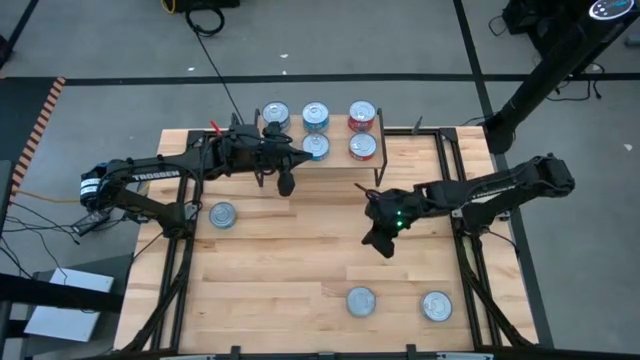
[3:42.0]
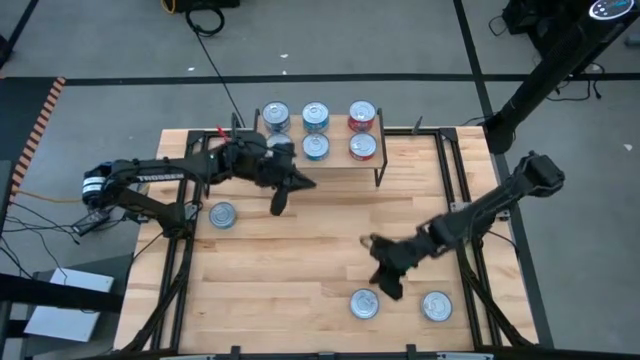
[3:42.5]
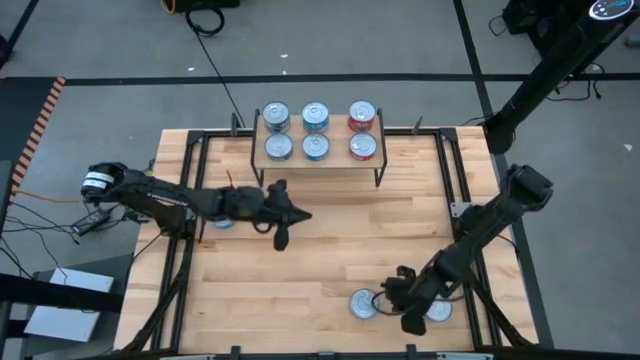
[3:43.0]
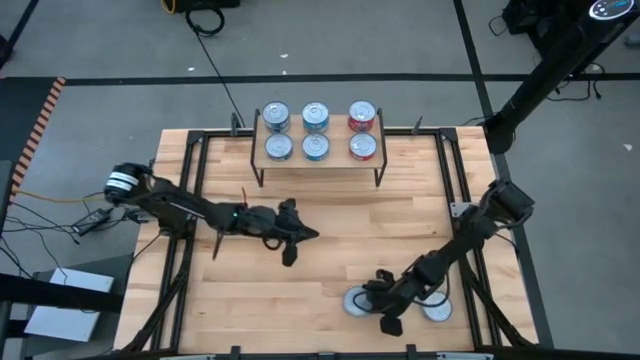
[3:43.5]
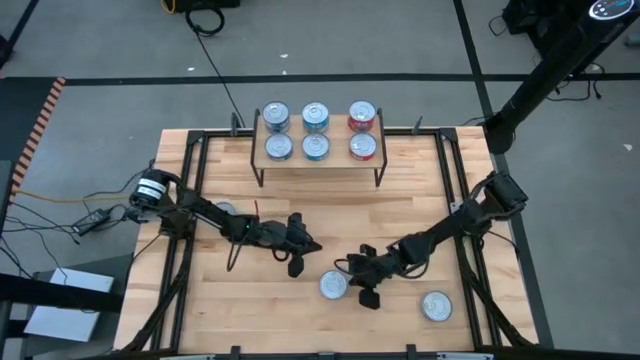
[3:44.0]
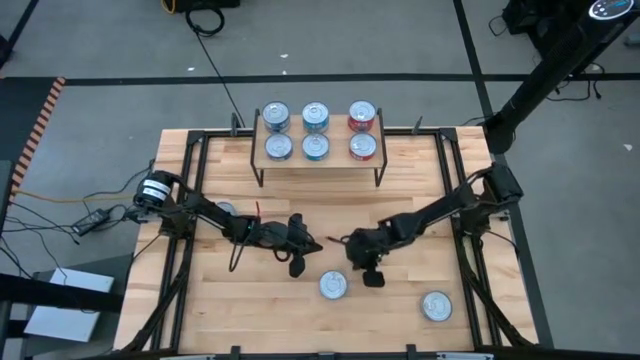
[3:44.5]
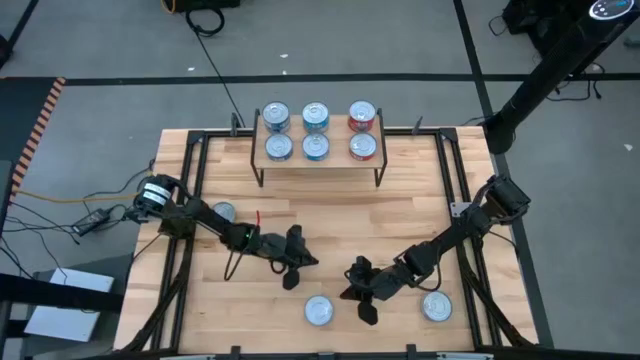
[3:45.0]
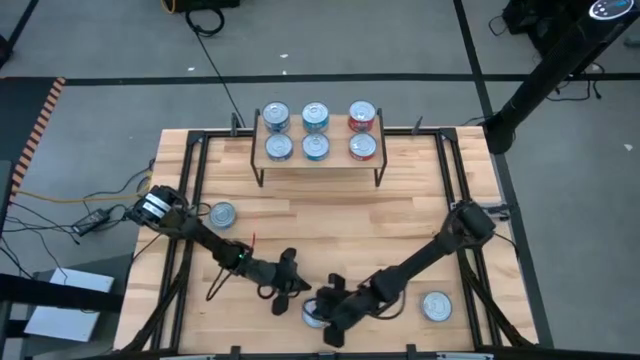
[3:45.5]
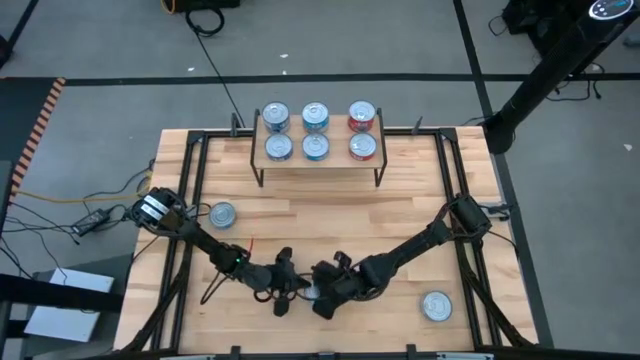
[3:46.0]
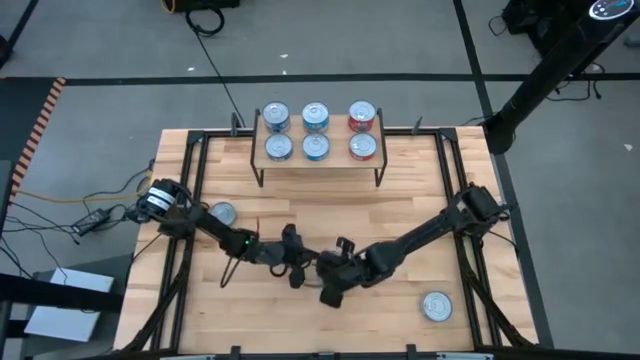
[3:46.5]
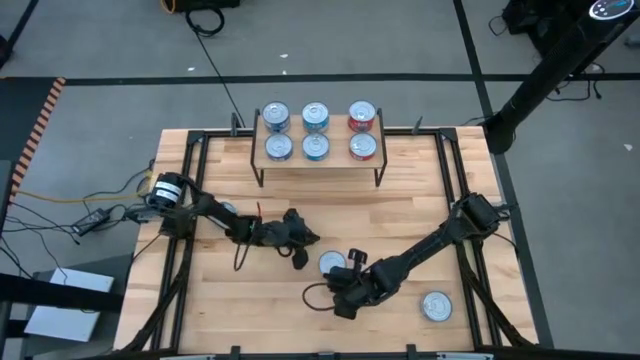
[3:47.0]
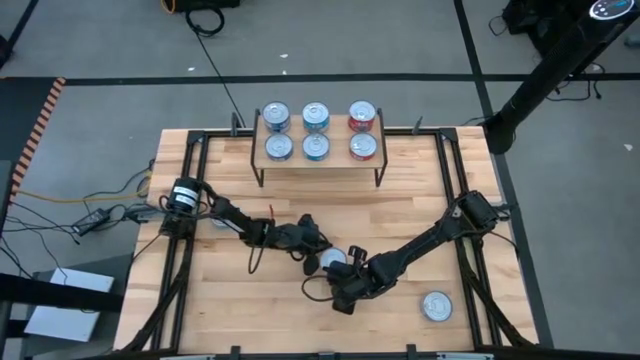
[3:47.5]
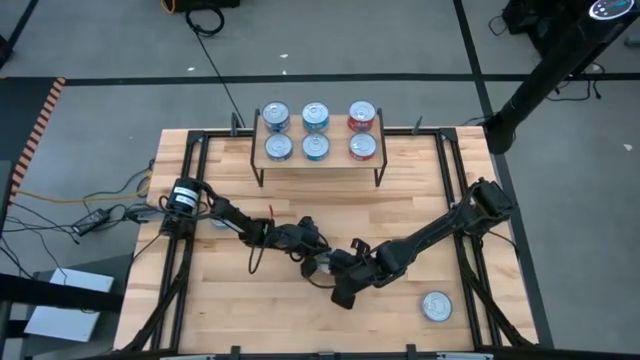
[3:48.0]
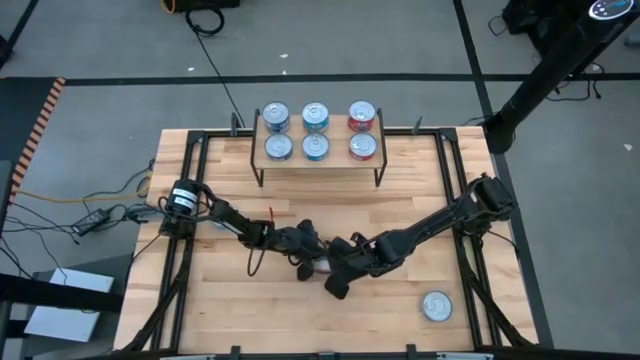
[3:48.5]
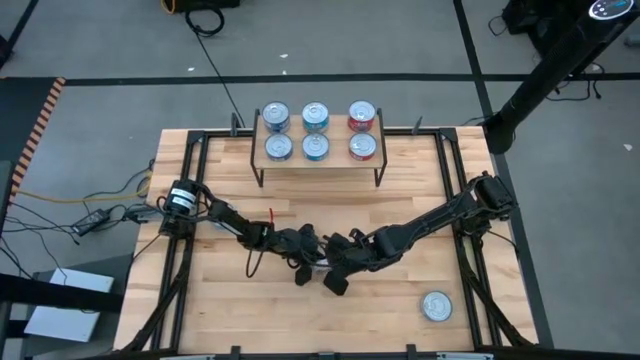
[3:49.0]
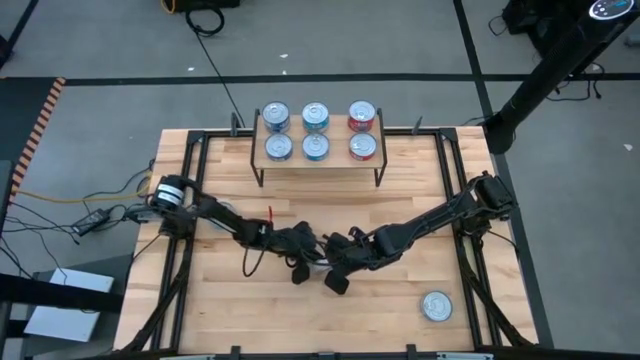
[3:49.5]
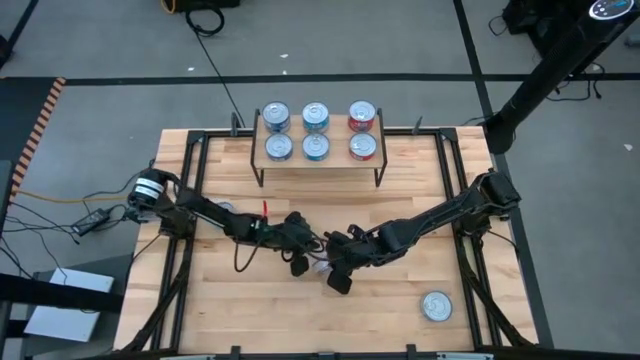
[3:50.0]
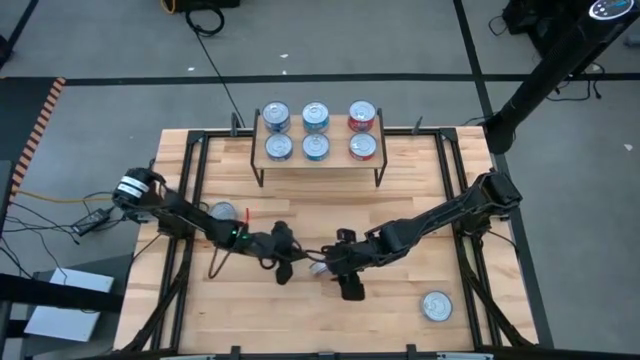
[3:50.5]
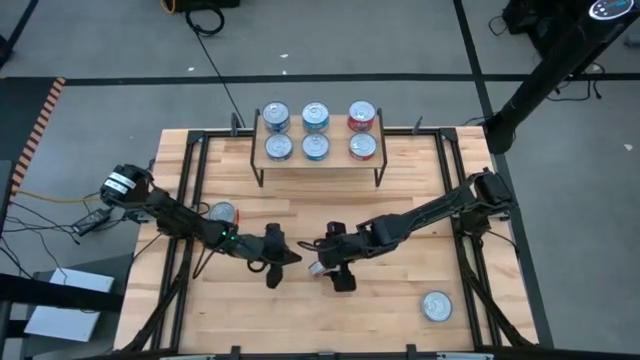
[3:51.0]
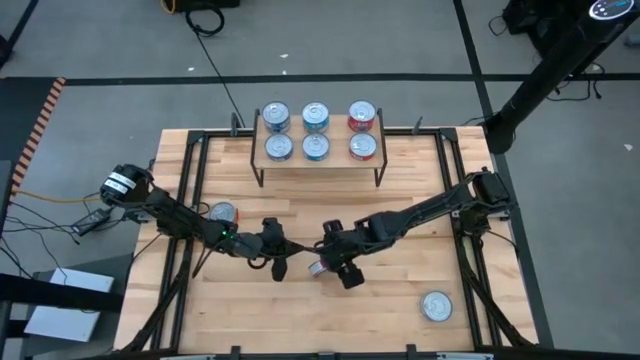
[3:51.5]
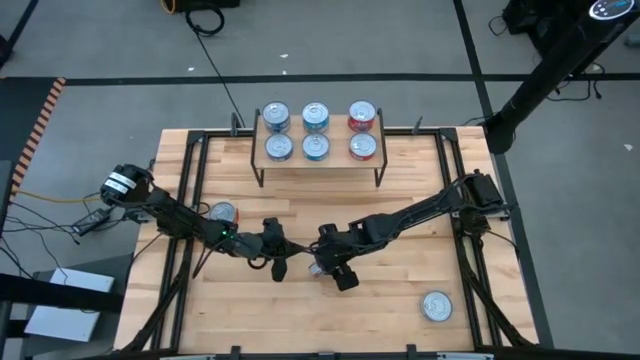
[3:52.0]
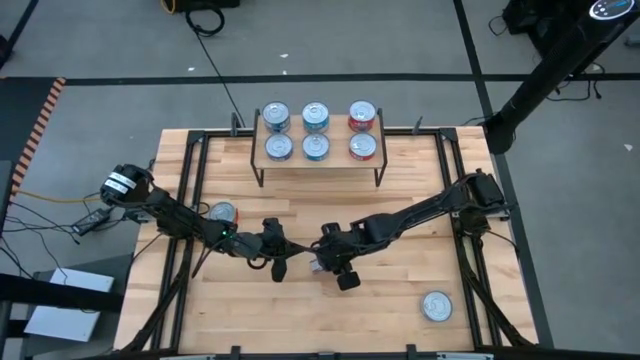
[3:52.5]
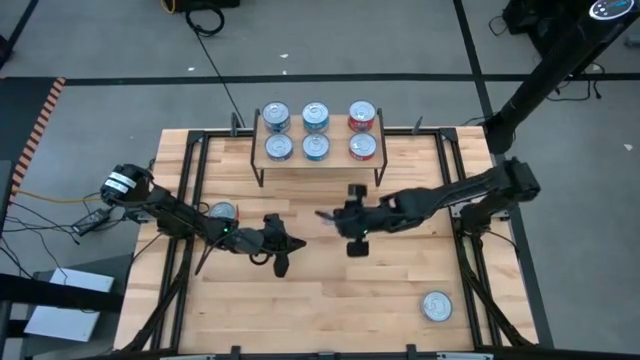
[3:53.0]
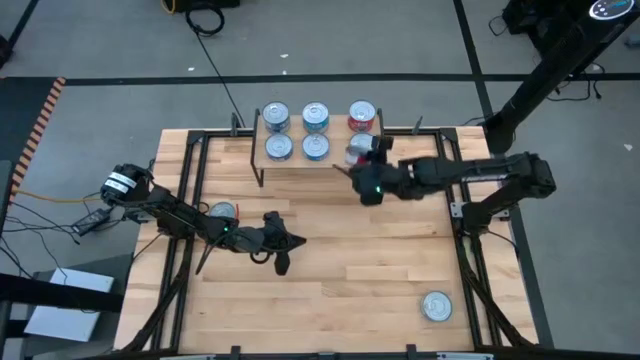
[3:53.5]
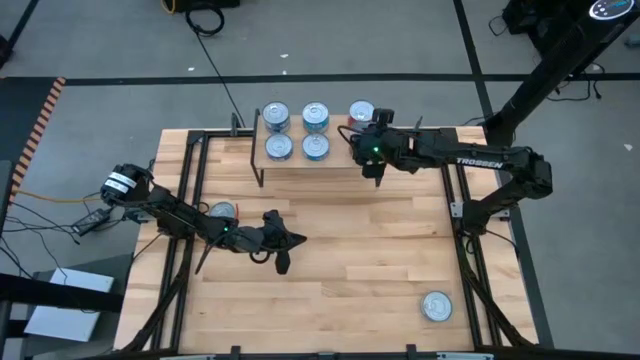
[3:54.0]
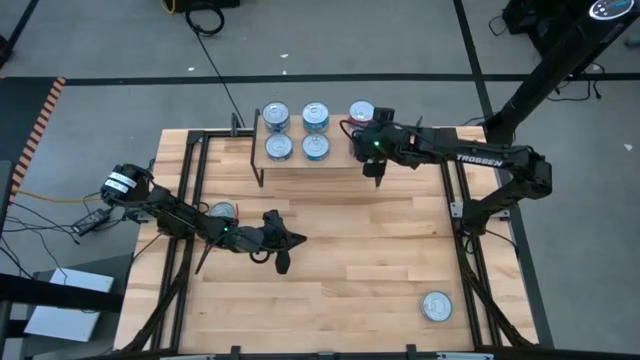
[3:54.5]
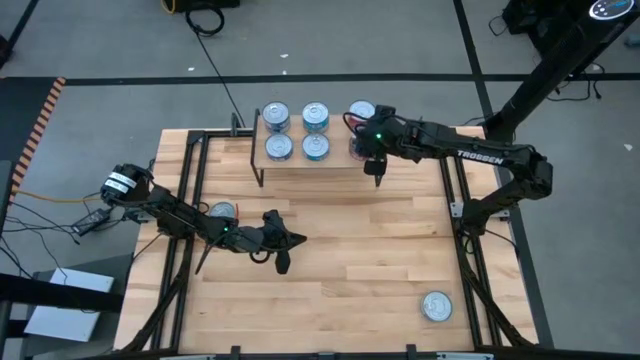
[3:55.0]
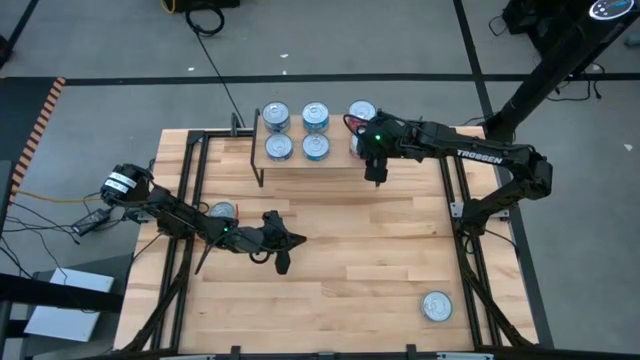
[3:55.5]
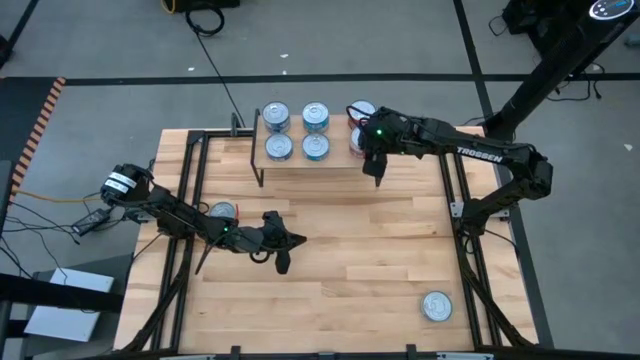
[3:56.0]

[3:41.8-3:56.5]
Task: Stack canned seafood by type on shelf
Stack the red tuna can on top of the other red tuna can on the shelf

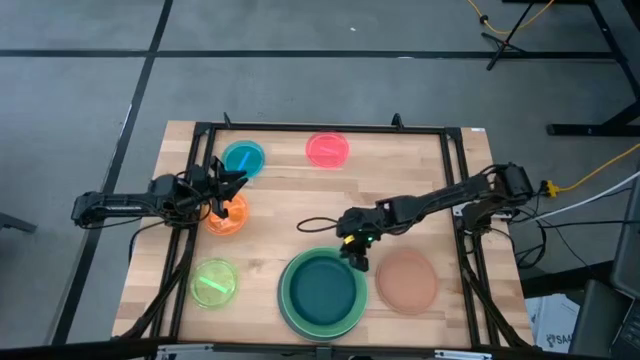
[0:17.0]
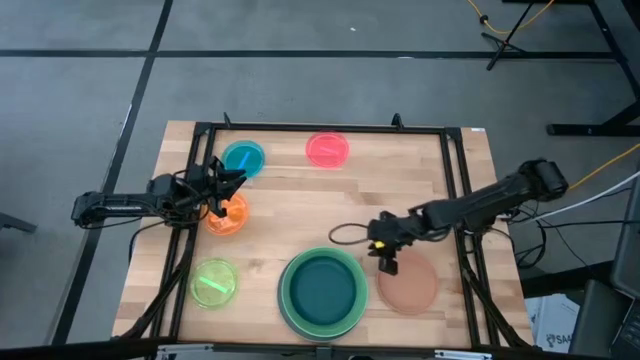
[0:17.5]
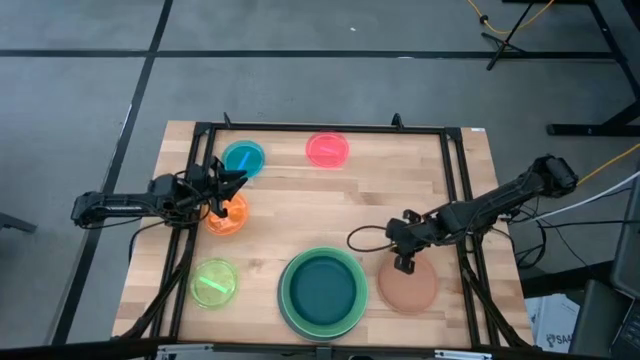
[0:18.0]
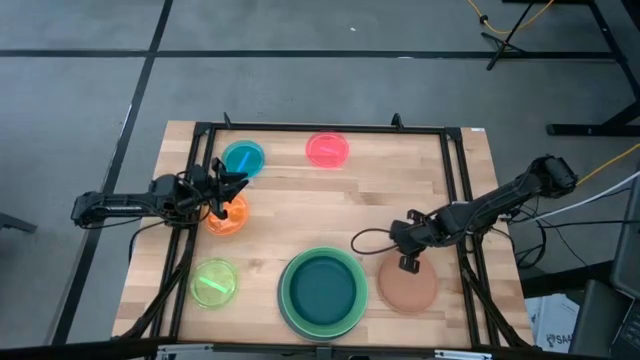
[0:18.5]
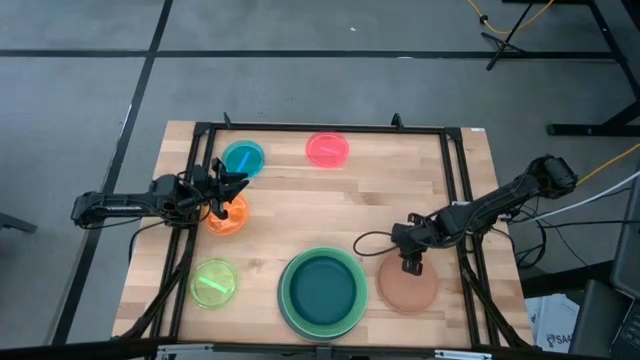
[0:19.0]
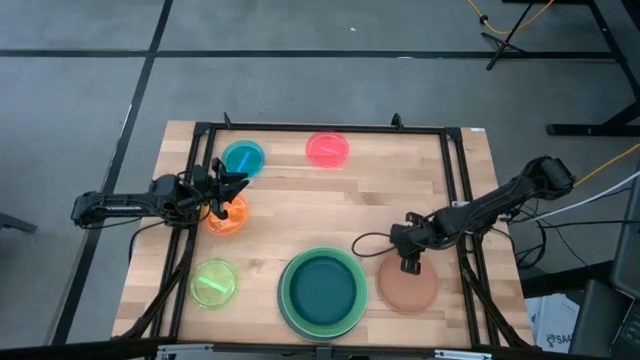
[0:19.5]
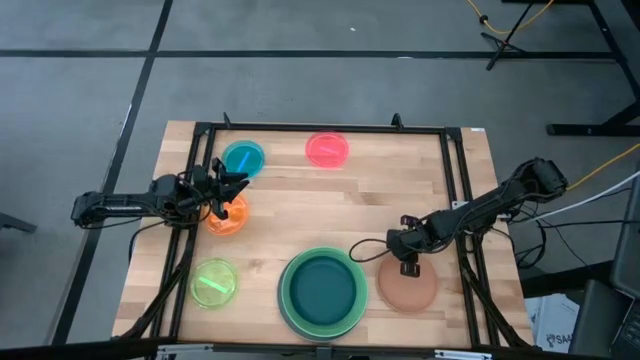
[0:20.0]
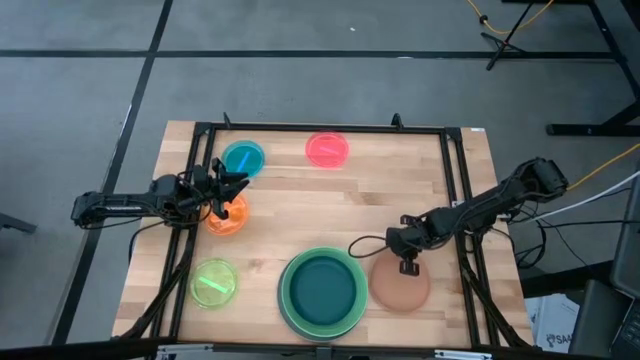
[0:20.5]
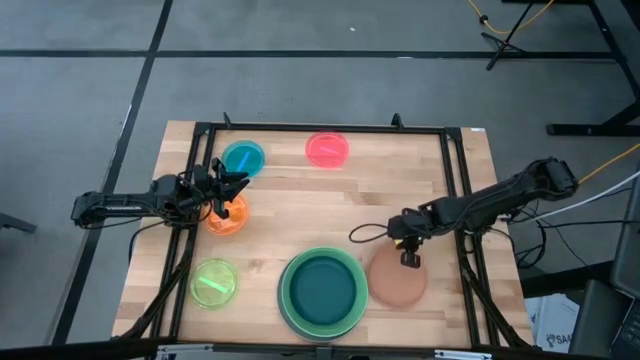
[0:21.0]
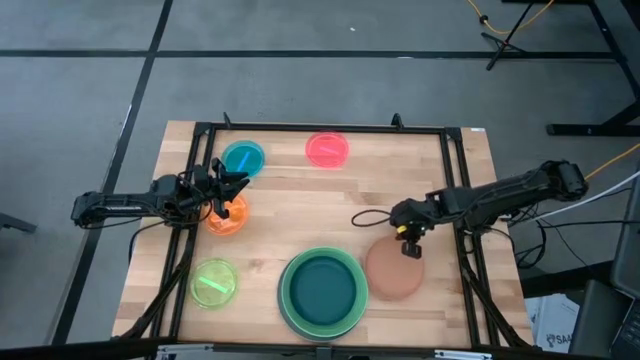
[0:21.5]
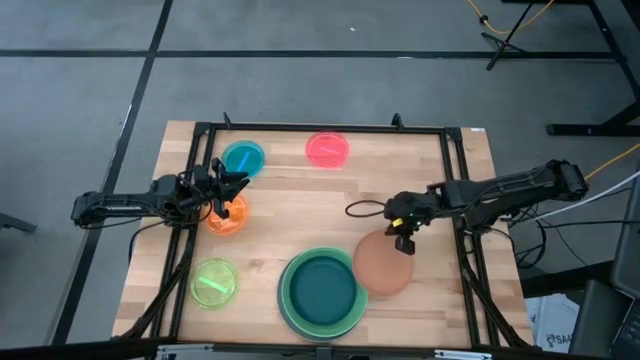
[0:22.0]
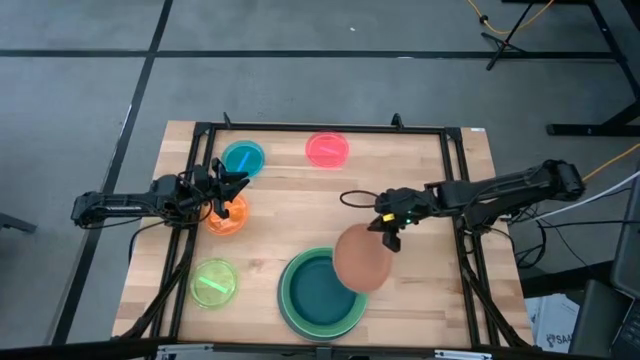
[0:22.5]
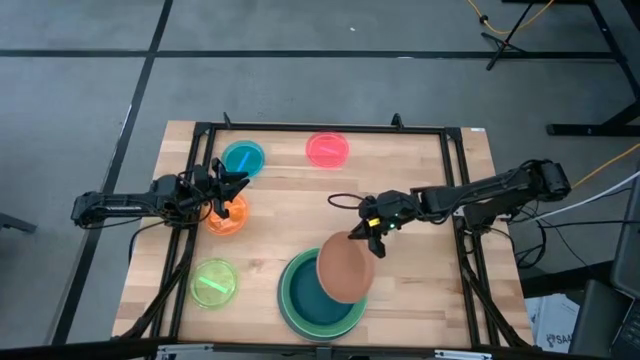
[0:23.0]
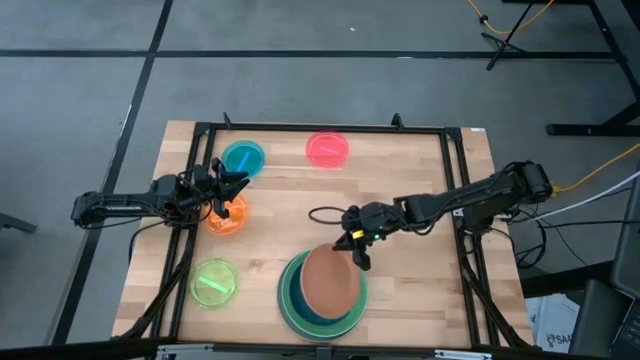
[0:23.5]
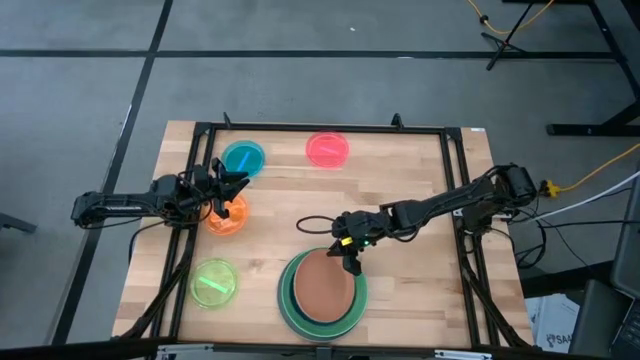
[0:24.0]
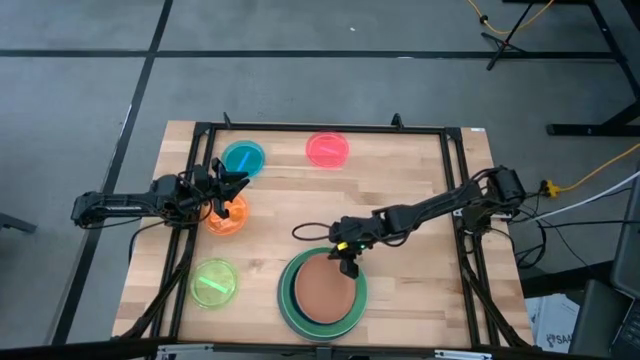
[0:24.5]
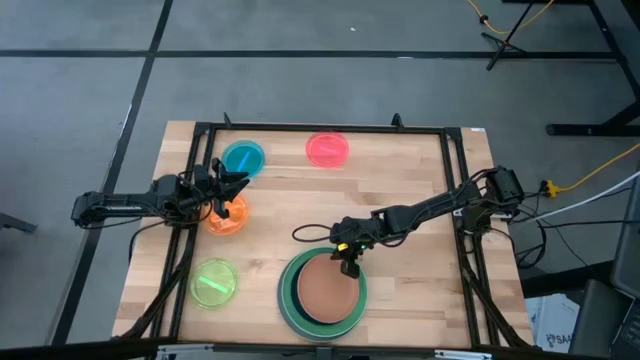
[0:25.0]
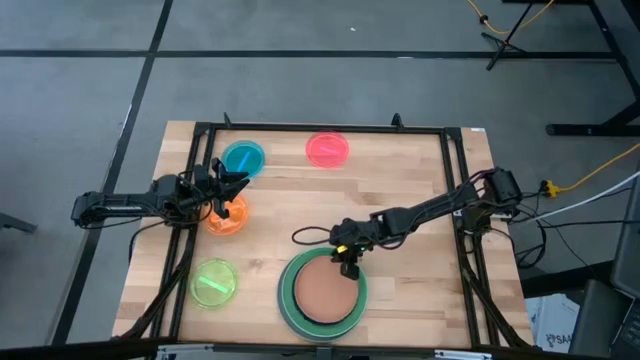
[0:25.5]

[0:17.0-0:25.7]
Task: Stack plastic plates
Stack the brown plate on top of the blue plate
